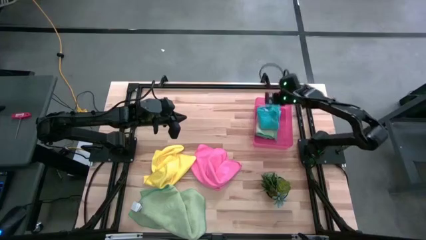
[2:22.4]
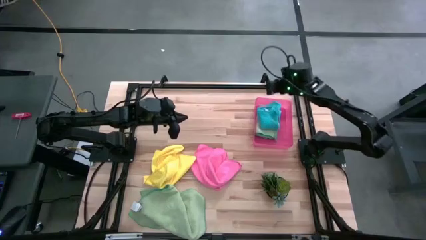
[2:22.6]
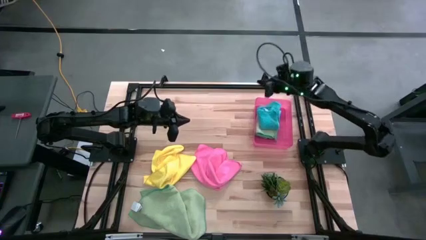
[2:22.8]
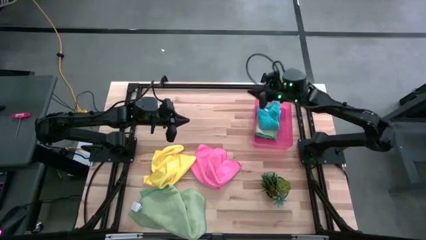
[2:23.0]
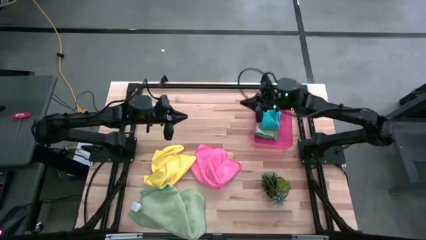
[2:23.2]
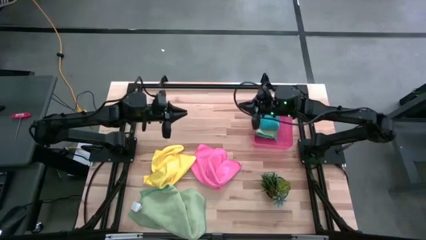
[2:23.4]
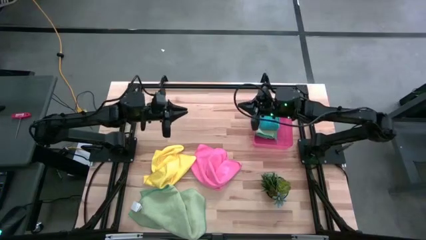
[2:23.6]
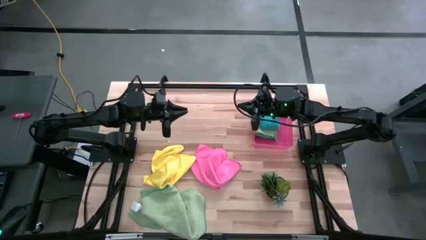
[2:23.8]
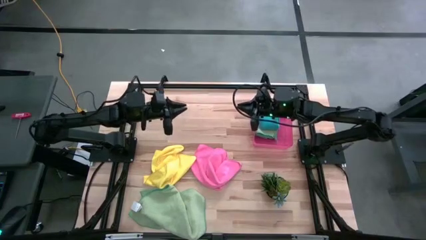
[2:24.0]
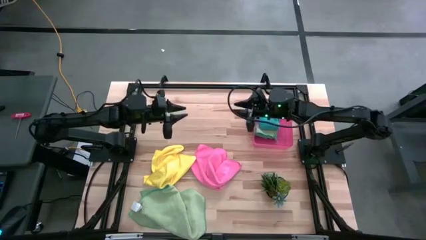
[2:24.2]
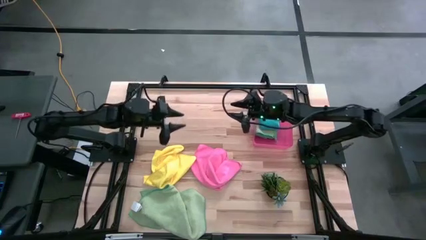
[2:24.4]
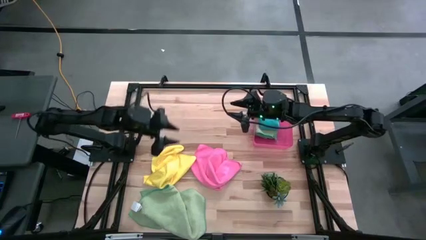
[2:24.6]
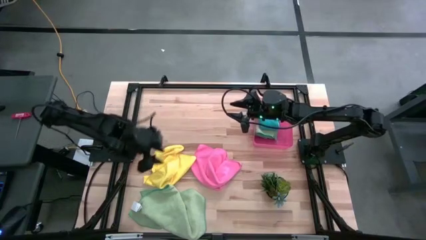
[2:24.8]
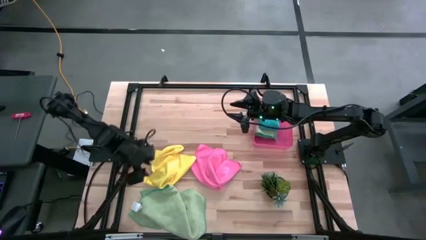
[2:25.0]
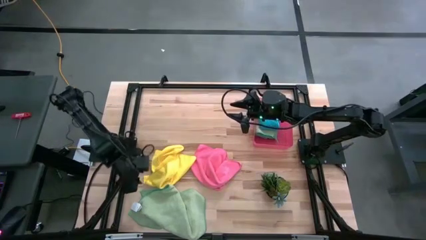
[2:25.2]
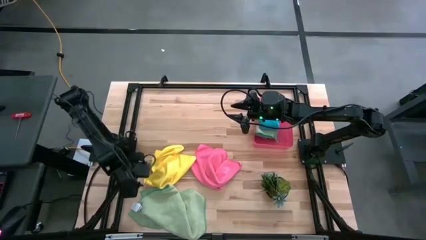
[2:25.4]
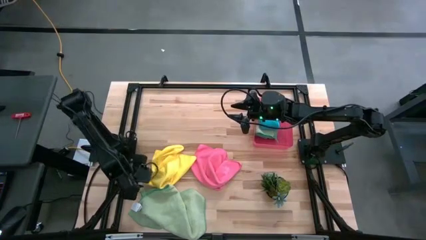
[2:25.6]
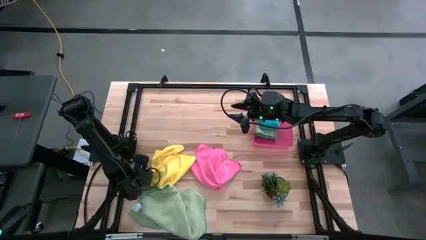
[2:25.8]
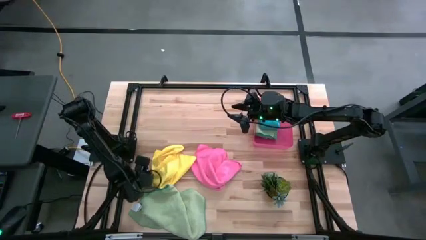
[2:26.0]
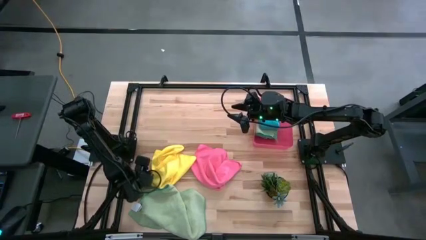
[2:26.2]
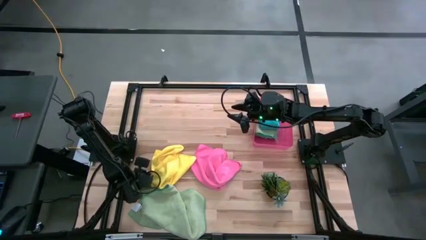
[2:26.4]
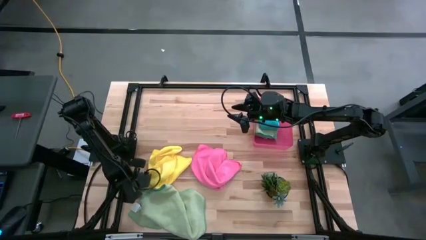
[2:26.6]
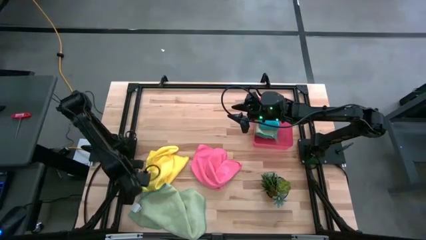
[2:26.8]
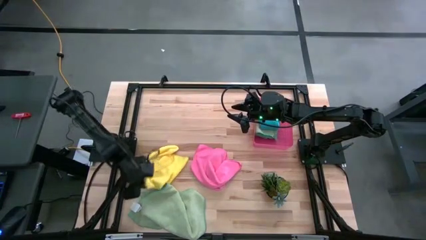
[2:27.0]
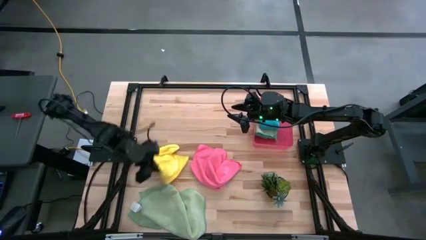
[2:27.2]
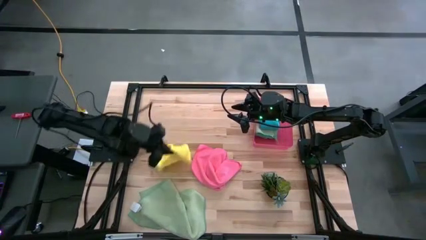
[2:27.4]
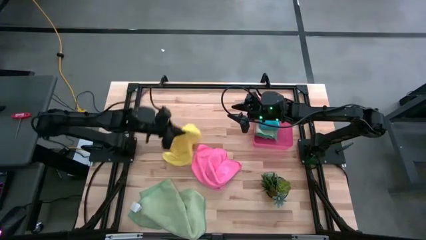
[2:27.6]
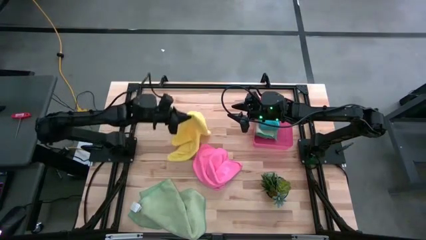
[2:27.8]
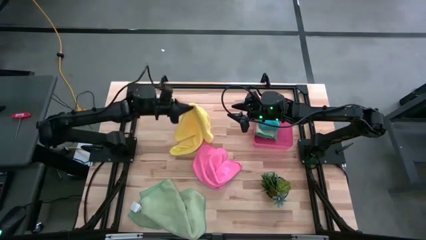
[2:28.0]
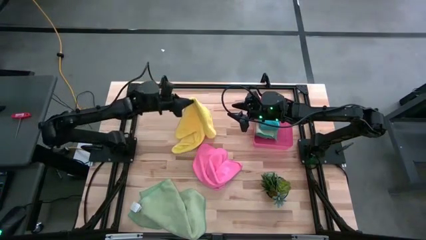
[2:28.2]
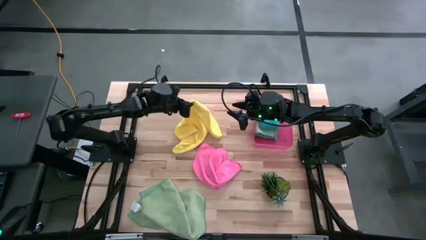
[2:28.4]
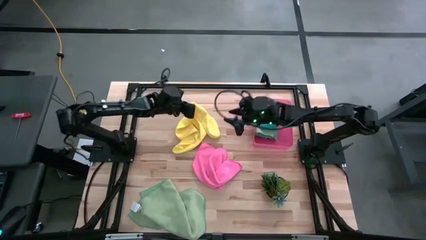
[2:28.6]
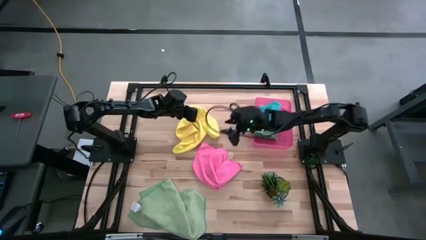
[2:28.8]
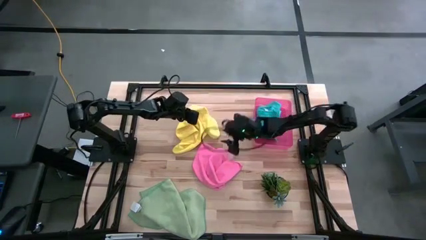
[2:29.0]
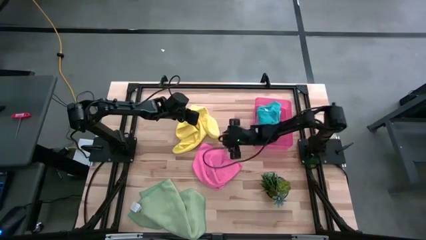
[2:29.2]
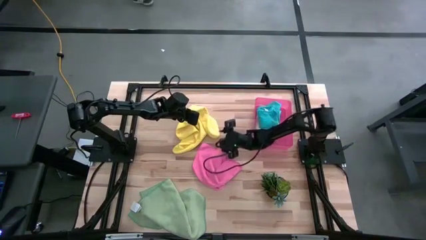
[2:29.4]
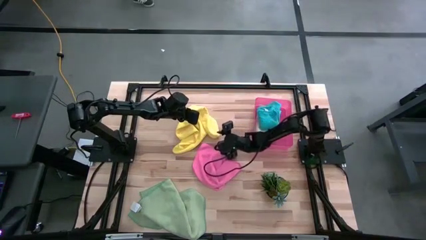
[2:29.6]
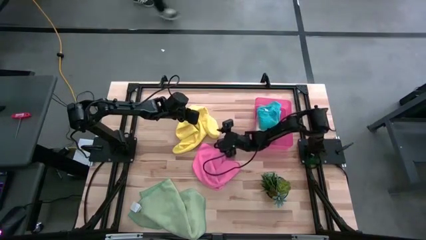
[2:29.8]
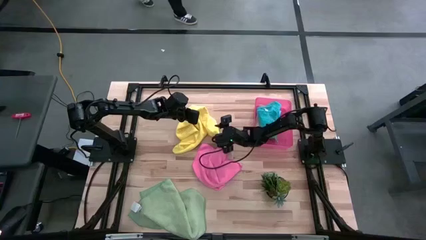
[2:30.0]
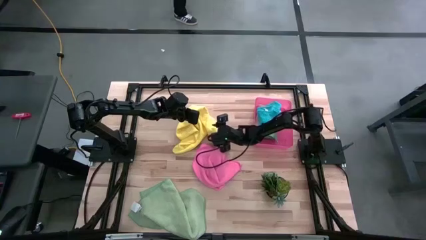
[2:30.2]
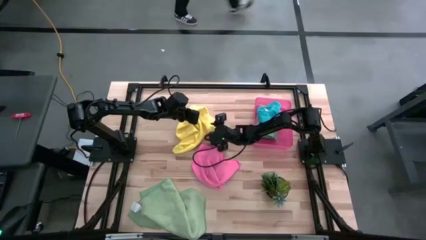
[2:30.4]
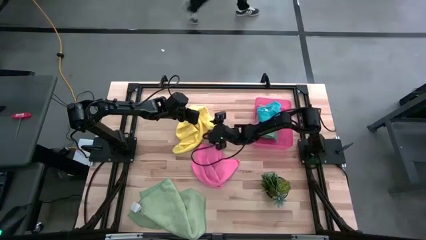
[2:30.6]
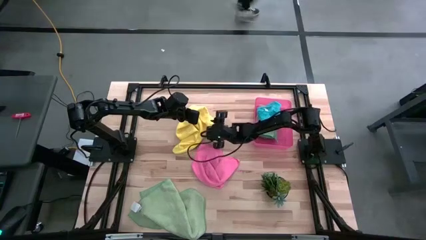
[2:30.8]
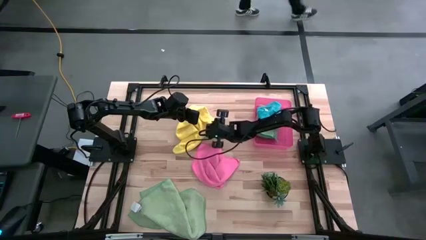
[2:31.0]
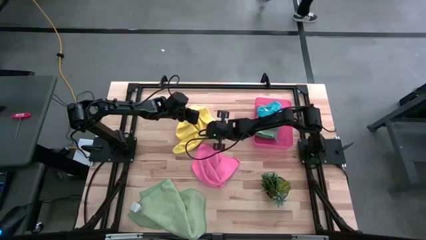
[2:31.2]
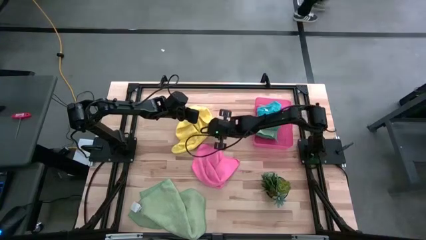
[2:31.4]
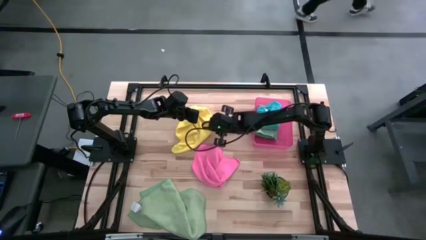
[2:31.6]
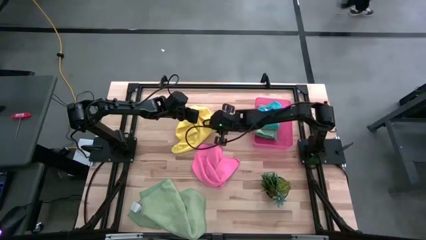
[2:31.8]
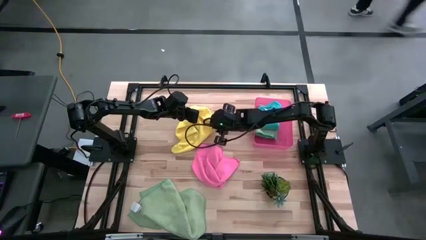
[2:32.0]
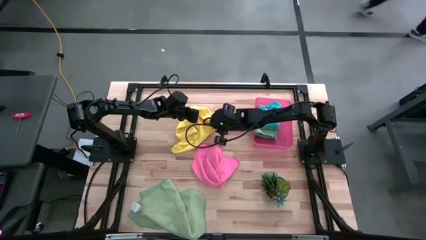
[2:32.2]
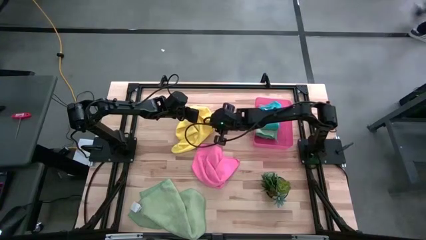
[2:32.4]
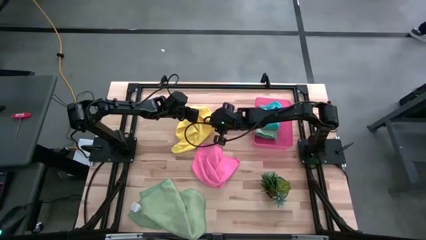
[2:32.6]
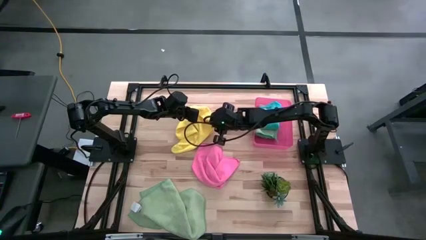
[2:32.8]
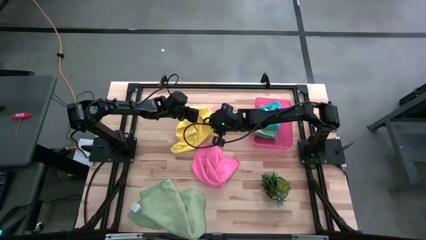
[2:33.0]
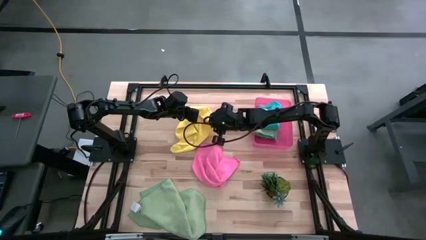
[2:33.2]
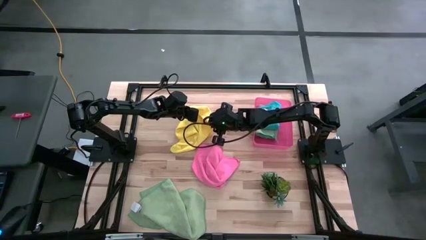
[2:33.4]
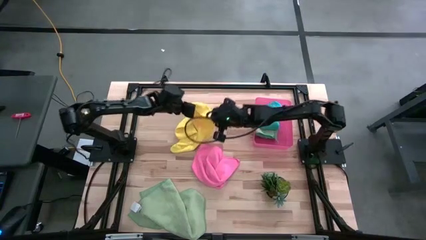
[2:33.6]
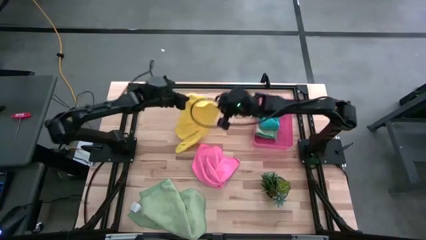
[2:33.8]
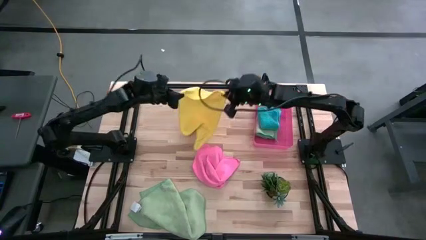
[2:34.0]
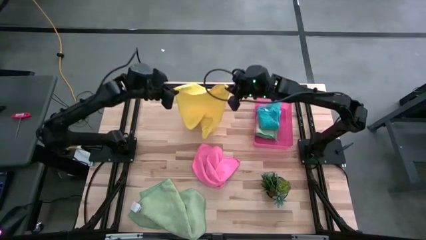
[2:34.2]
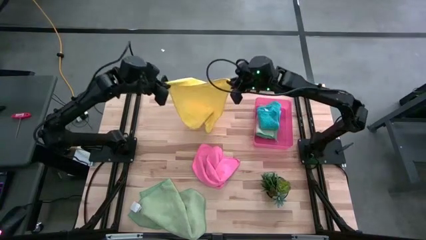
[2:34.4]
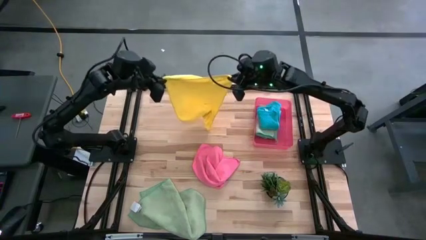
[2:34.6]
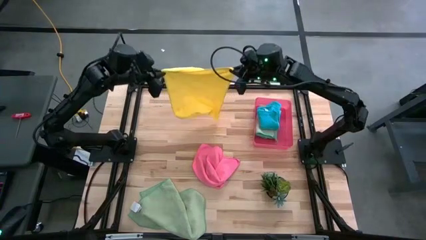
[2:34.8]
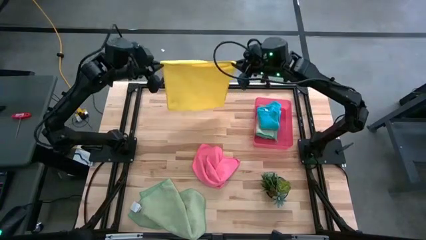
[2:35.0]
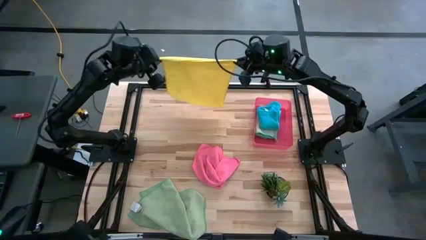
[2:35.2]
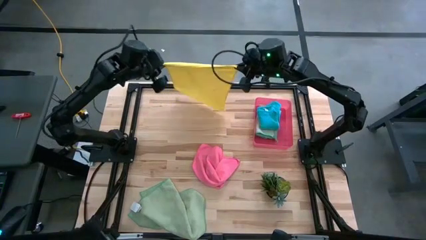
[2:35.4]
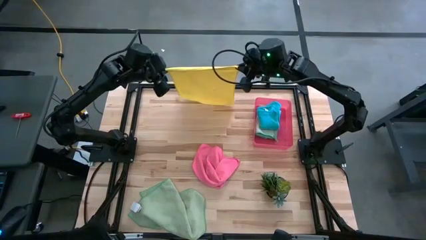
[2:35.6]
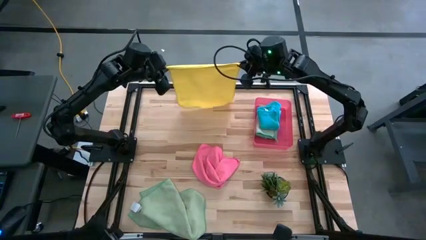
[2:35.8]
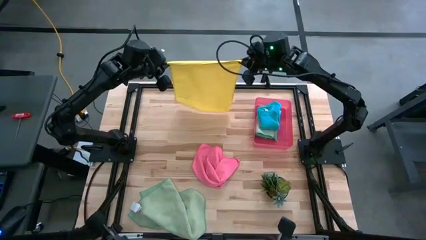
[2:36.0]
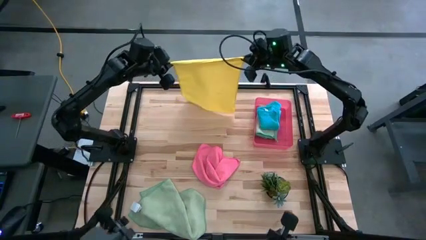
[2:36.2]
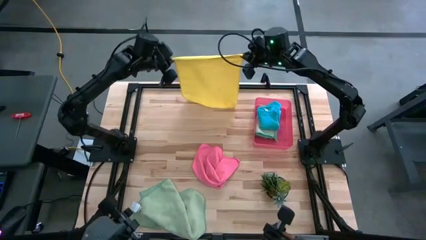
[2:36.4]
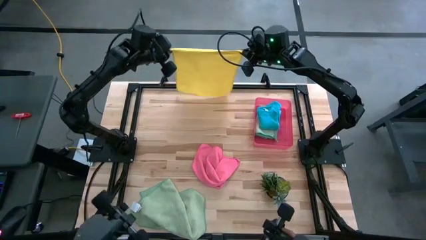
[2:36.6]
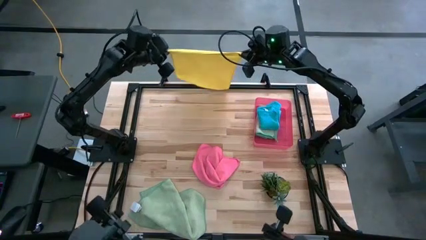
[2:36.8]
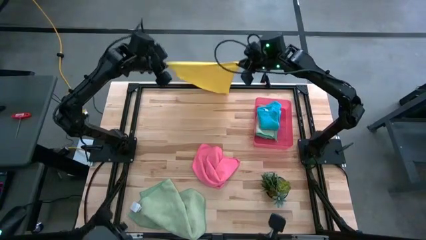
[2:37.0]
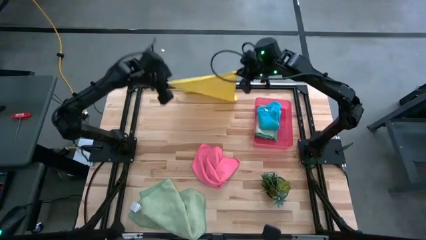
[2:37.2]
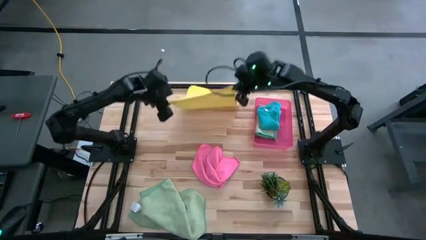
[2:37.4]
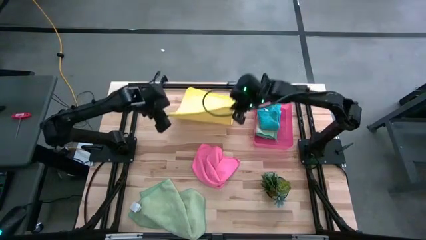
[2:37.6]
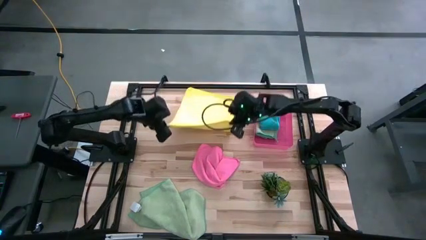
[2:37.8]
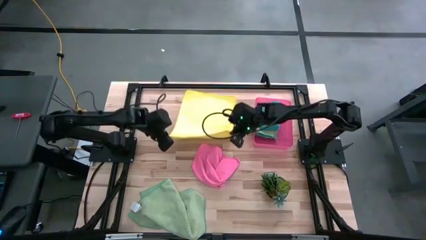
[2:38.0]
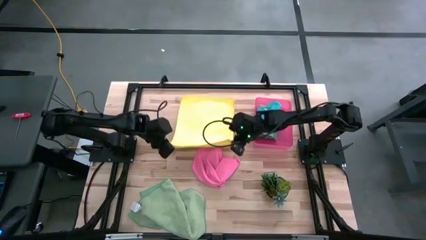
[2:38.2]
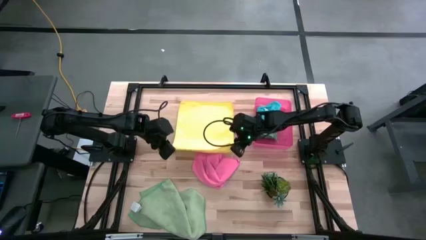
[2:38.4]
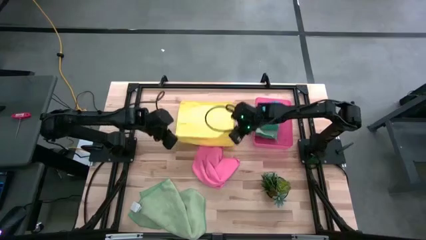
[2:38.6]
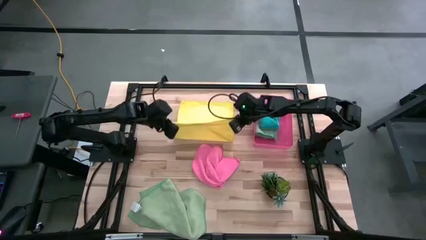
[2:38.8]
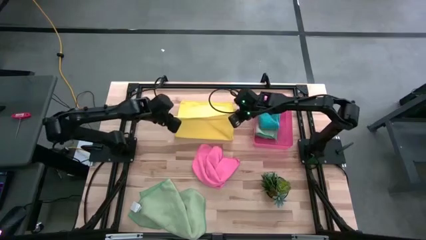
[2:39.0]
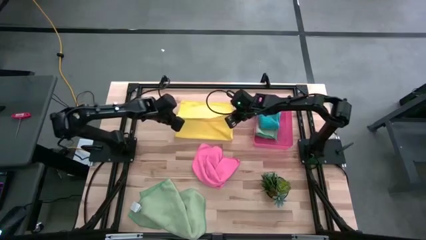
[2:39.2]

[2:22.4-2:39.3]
Task: Fold microfiber towels
Fold the yellow microfiber cloth
